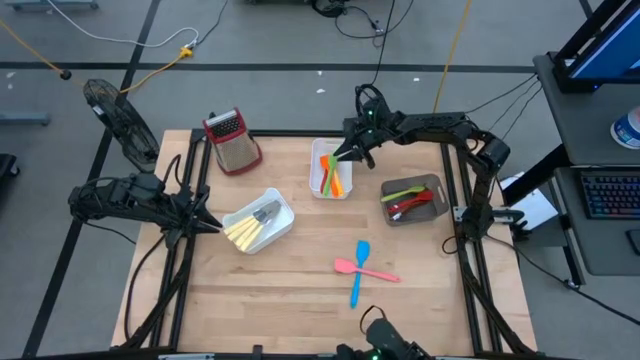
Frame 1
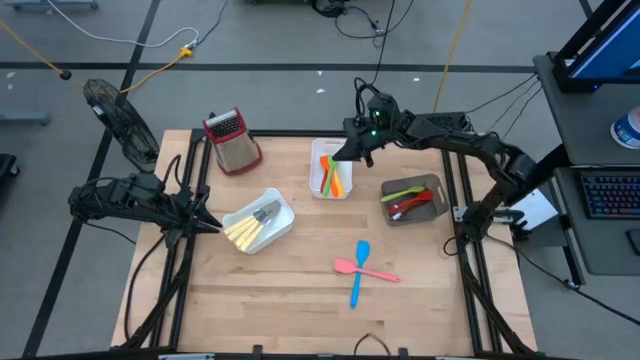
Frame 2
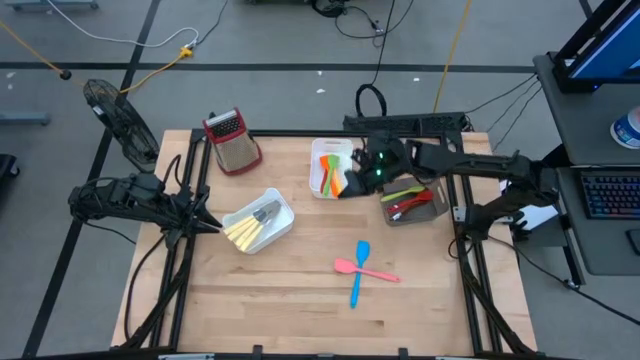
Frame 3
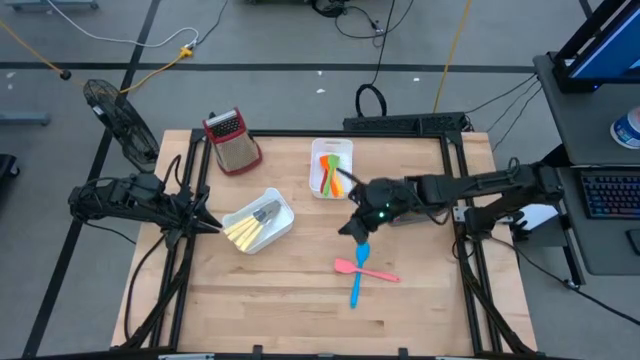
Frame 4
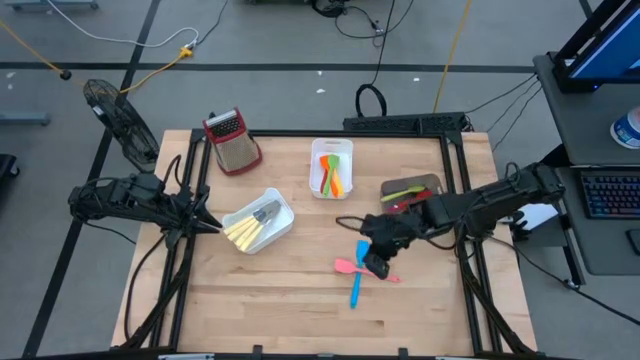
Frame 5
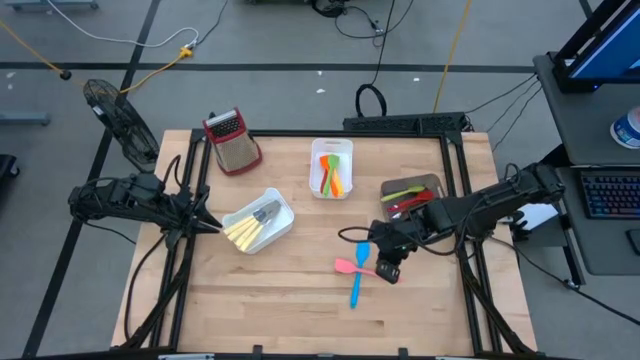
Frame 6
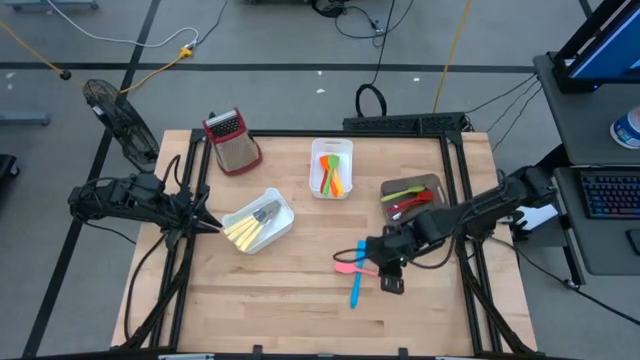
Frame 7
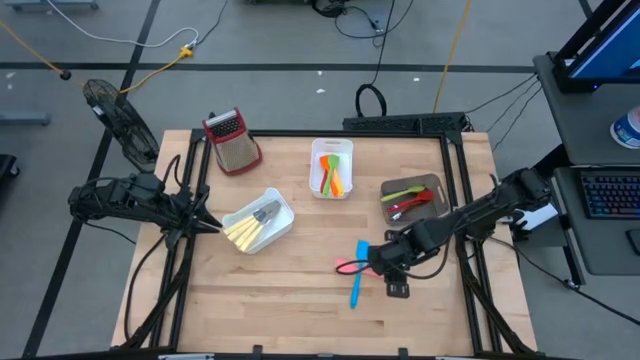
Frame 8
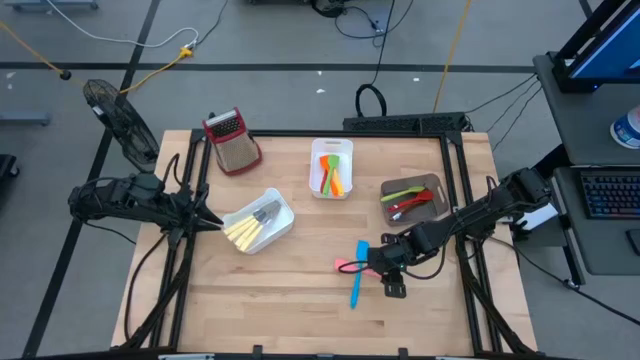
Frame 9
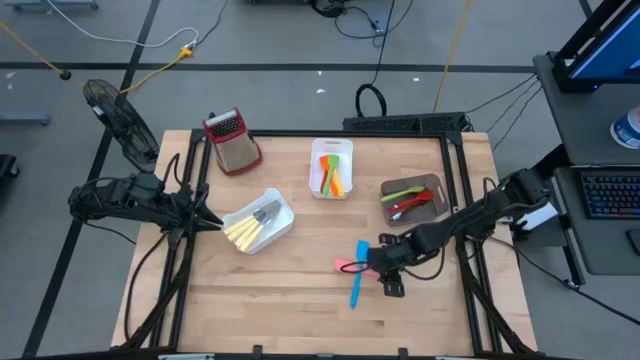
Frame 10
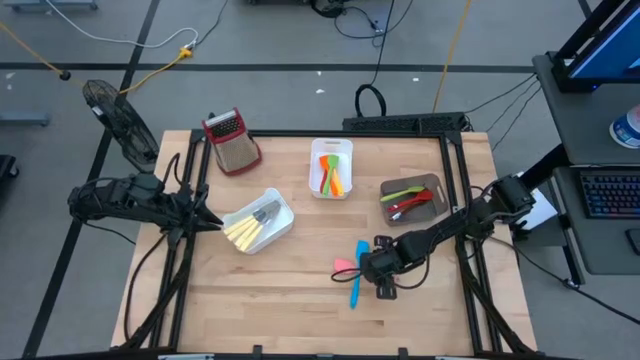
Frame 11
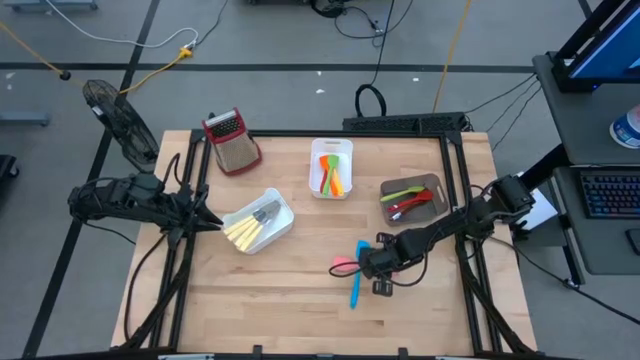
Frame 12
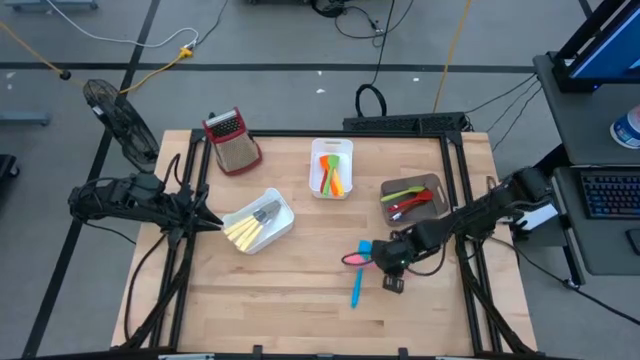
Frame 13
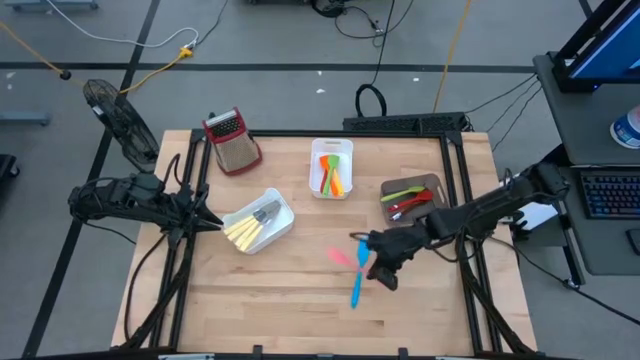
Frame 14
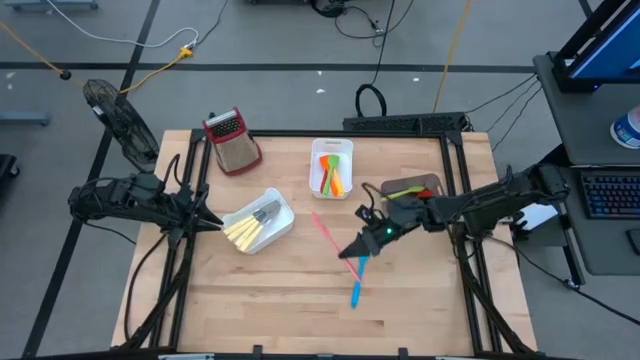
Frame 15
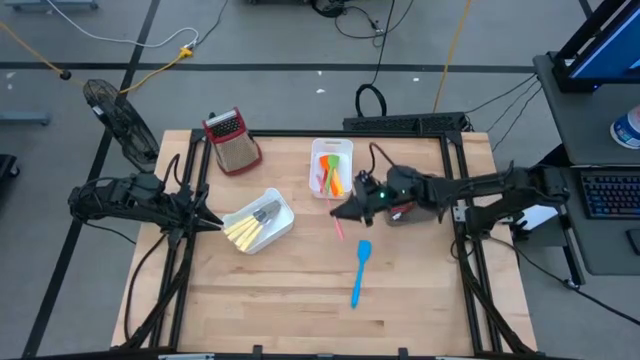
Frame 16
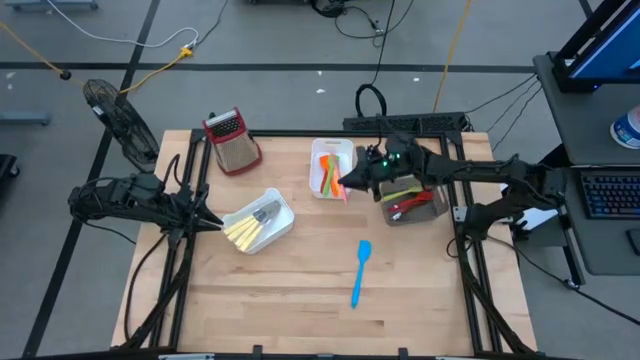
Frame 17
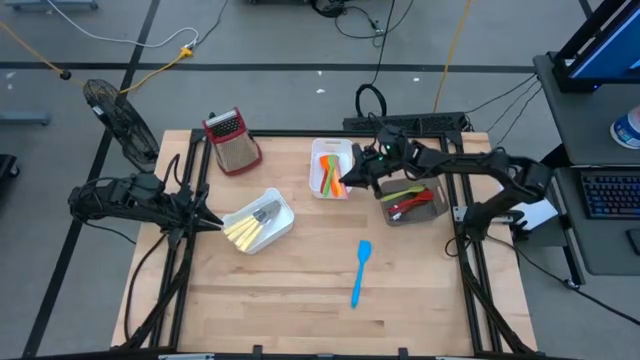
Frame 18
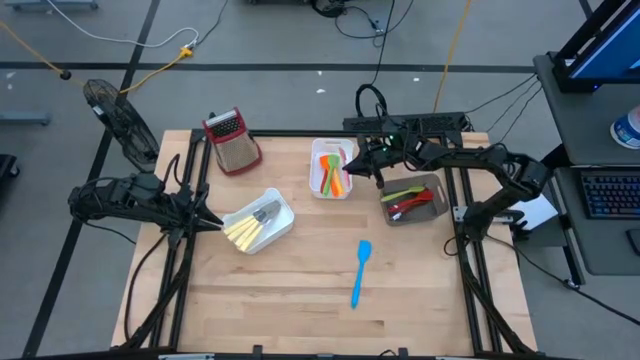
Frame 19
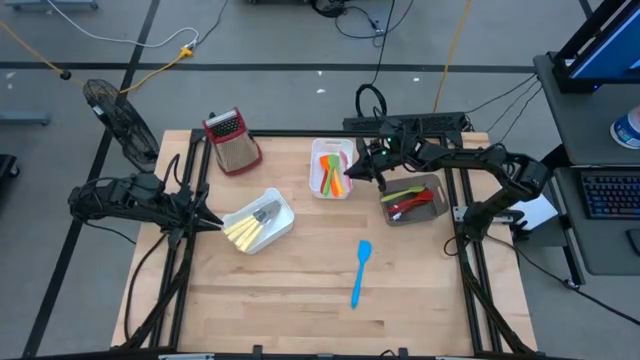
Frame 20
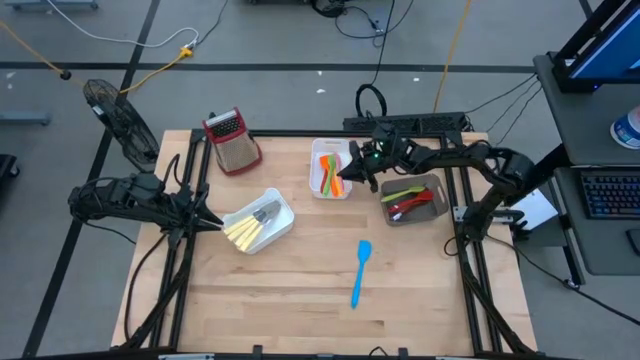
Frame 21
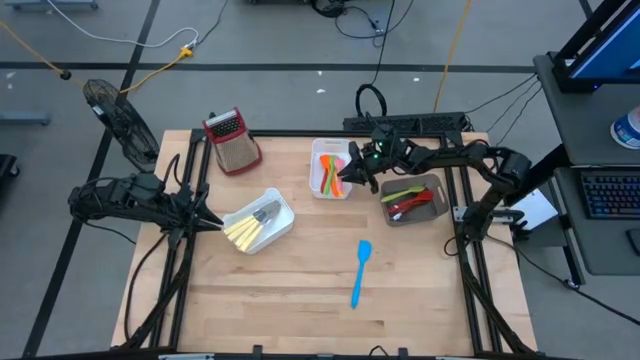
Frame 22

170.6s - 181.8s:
Task: Pick & Place Kitchen Items
Put the pink spatula into the top white bin

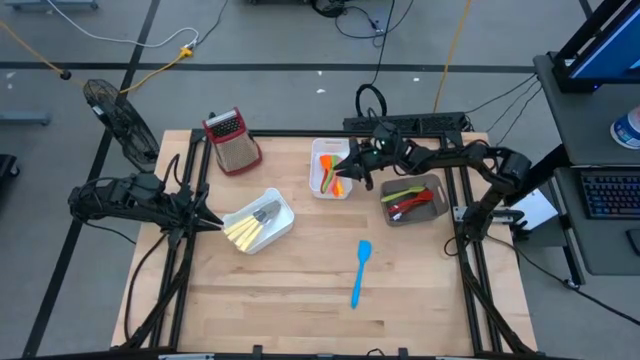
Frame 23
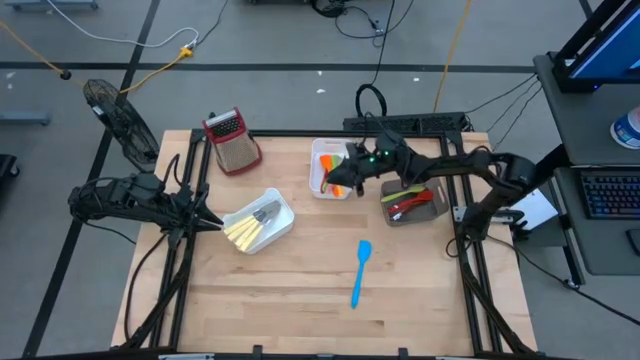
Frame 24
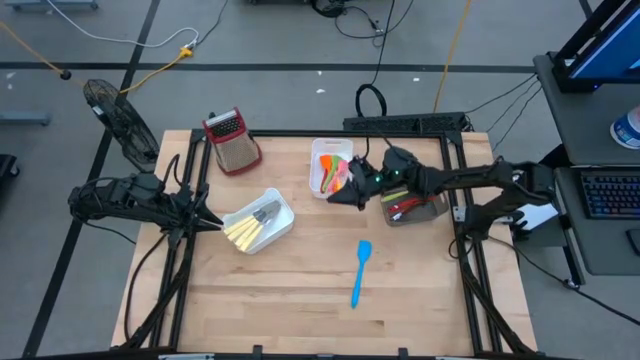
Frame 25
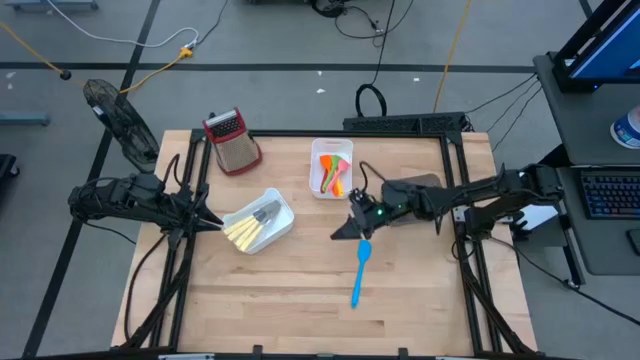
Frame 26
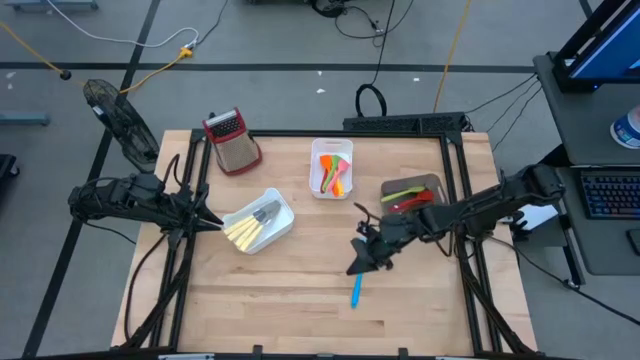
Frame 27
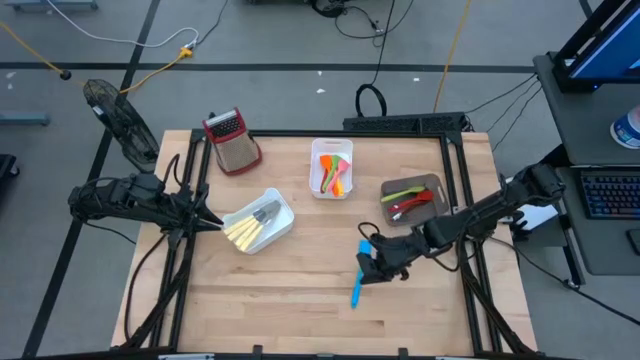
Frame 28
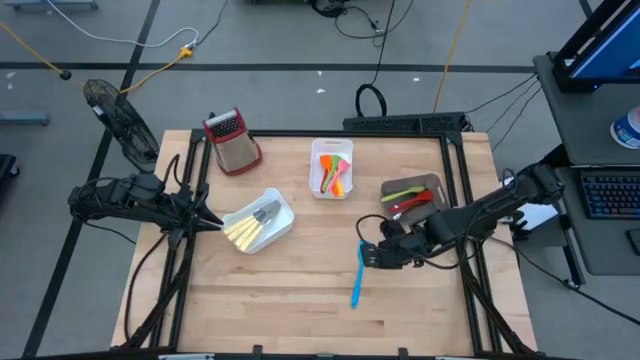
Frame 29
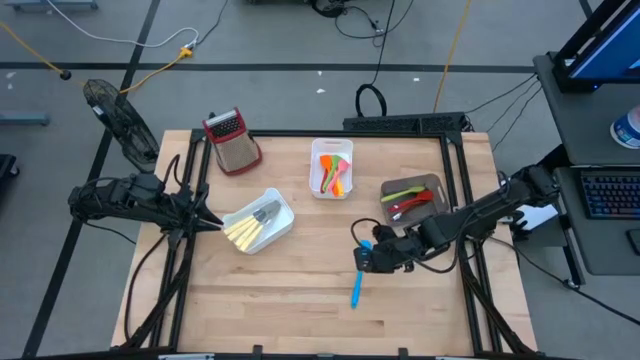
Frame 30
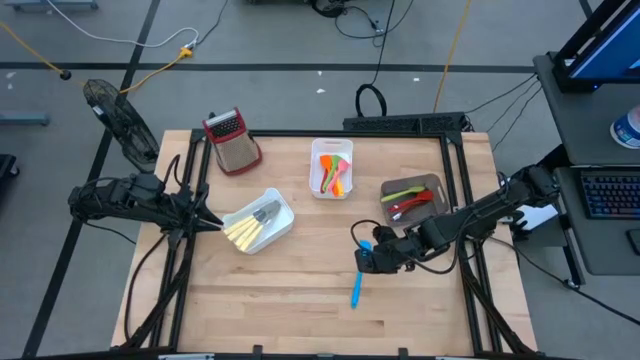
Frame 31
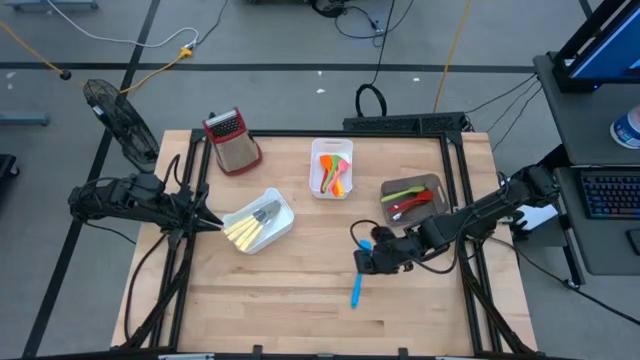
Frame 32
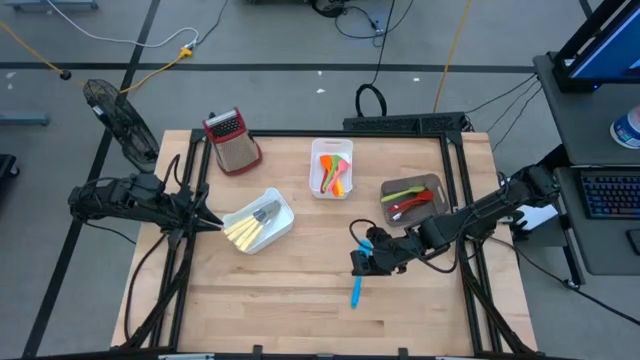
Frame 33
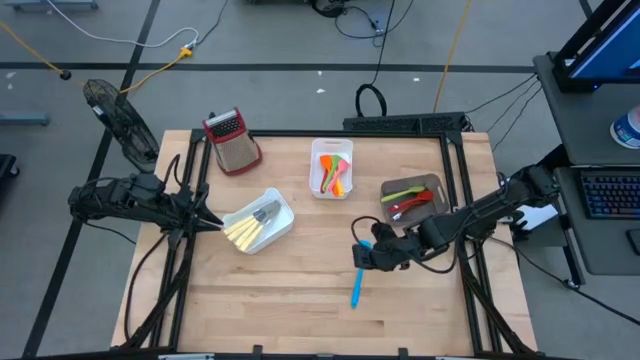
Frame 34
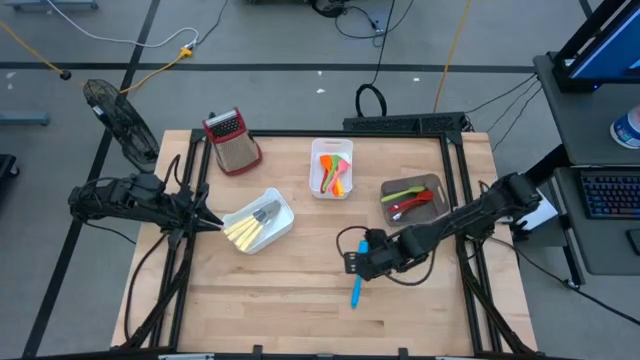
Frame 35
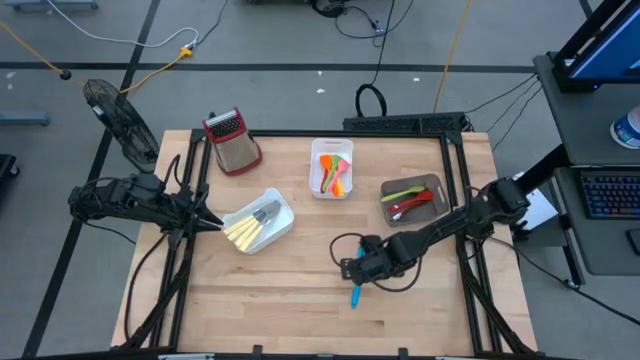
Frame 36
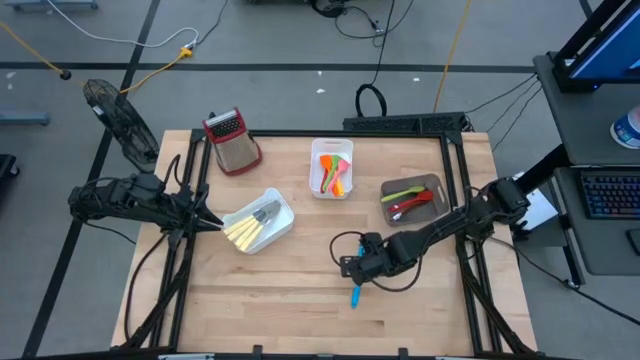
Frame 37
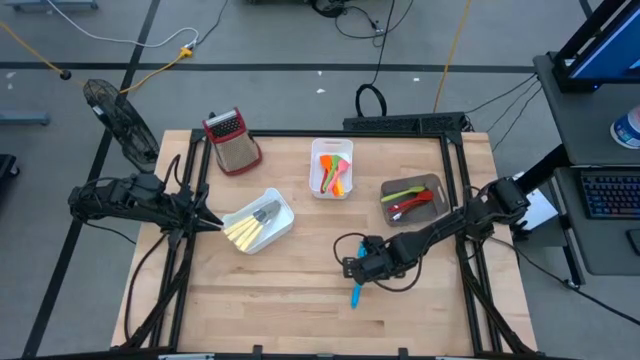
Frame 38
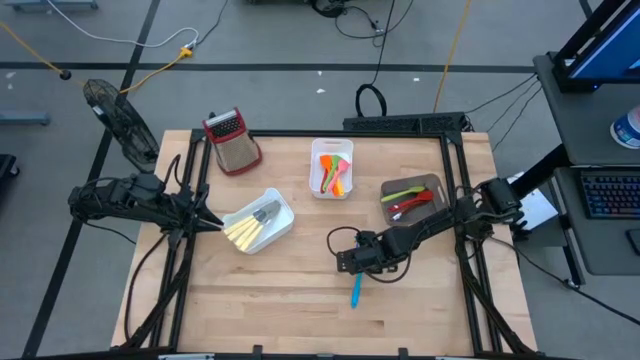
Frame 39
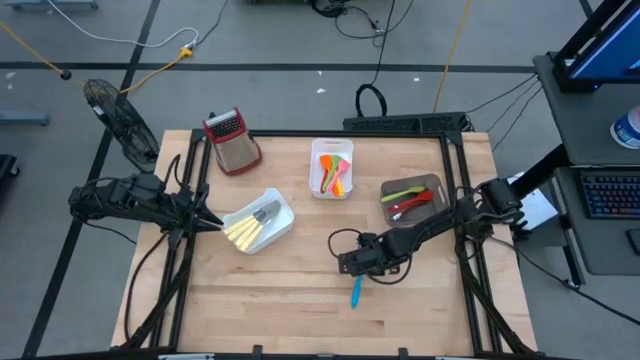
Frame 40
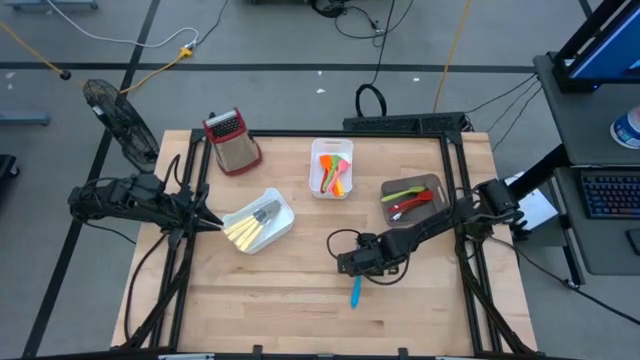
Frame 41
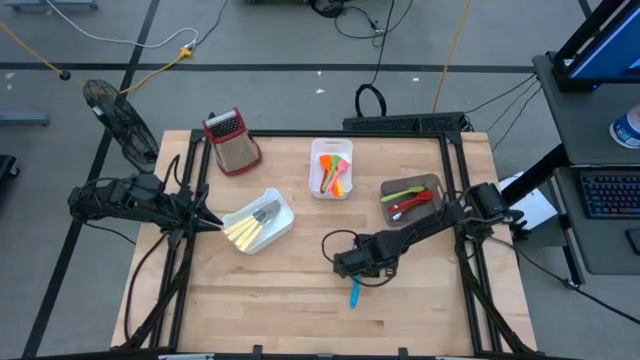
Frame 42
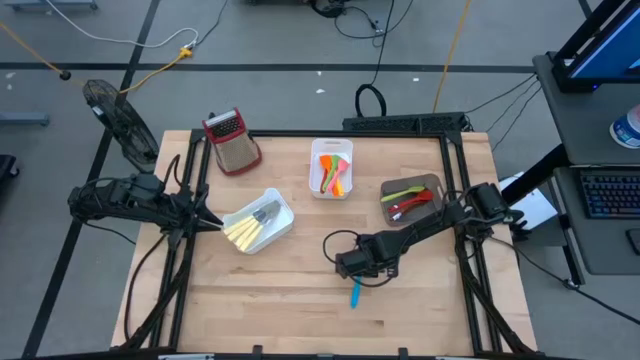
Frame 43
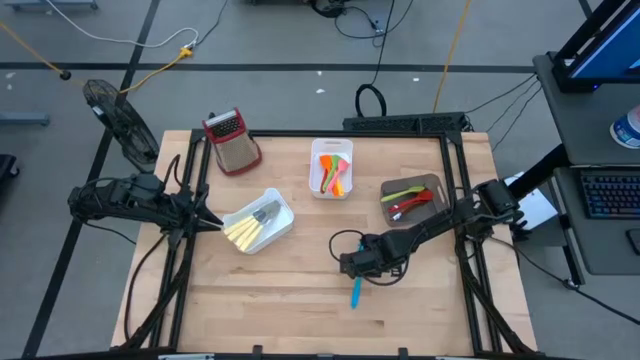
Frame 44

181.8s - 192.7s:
Put the blue spatula into the top white bin
